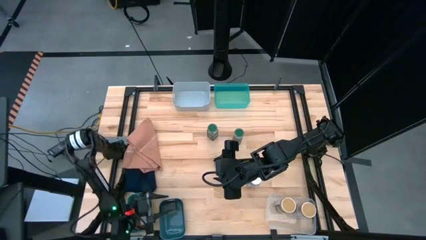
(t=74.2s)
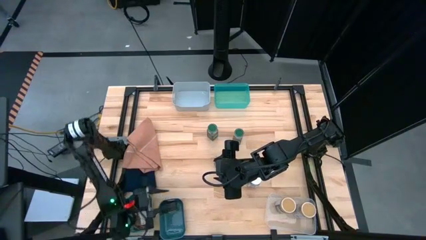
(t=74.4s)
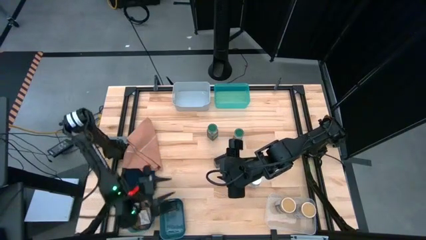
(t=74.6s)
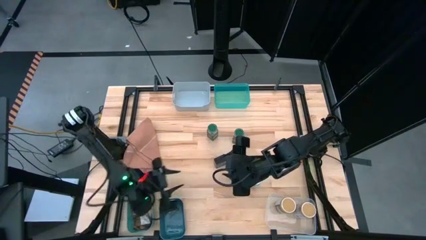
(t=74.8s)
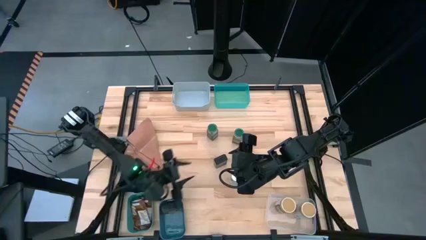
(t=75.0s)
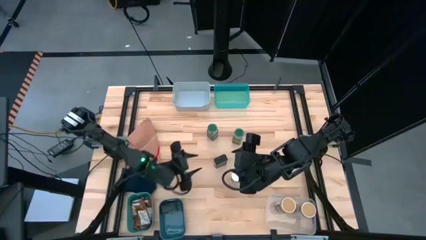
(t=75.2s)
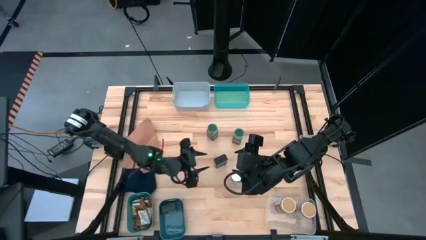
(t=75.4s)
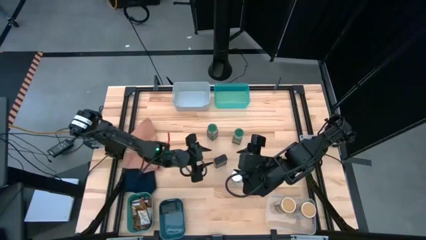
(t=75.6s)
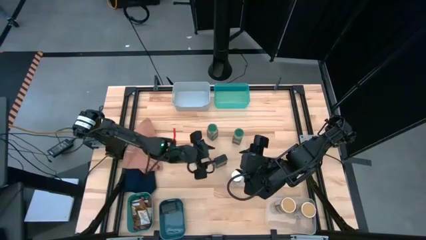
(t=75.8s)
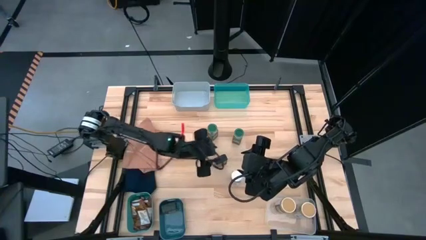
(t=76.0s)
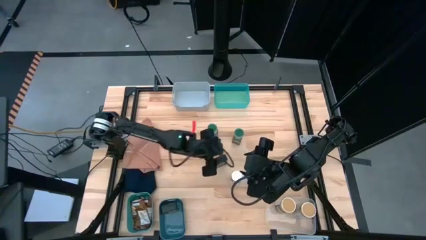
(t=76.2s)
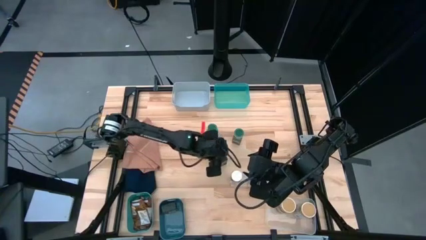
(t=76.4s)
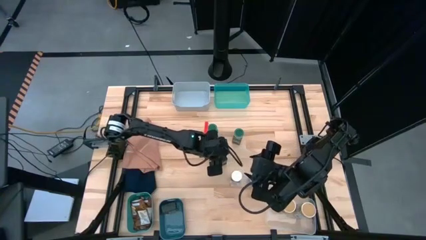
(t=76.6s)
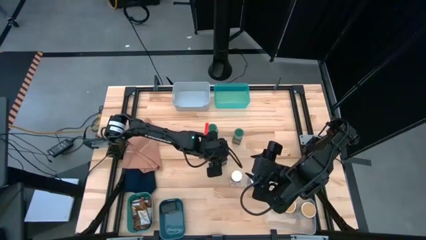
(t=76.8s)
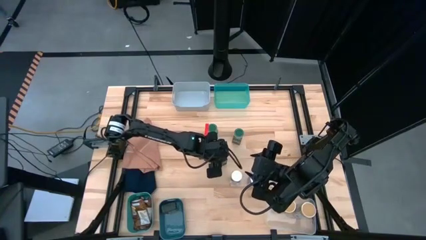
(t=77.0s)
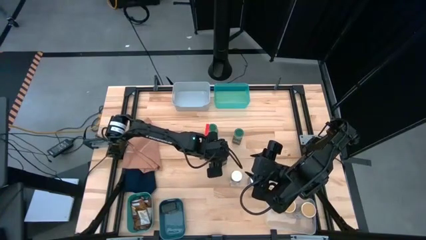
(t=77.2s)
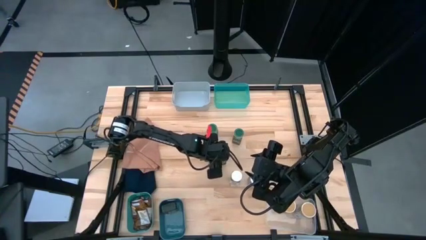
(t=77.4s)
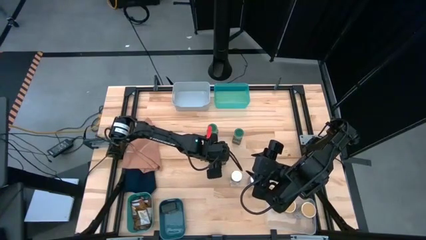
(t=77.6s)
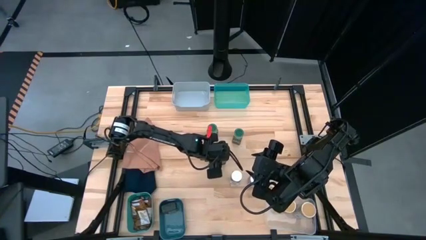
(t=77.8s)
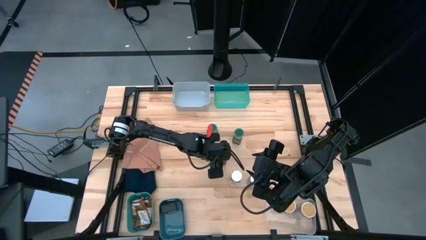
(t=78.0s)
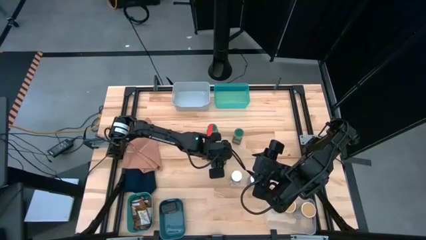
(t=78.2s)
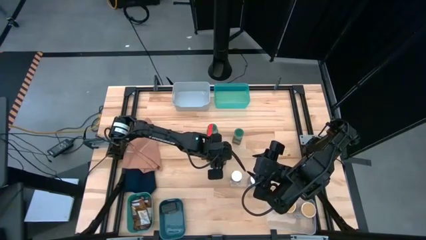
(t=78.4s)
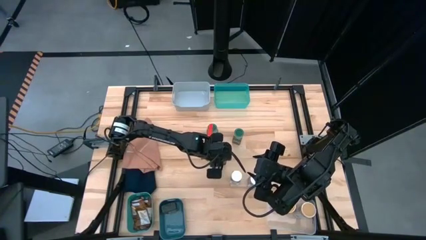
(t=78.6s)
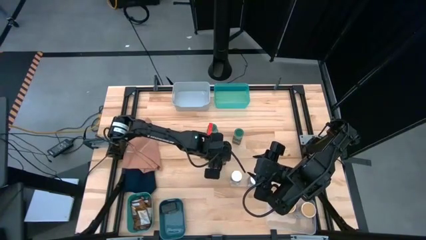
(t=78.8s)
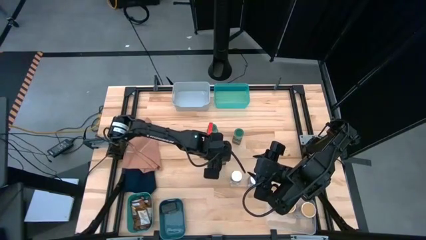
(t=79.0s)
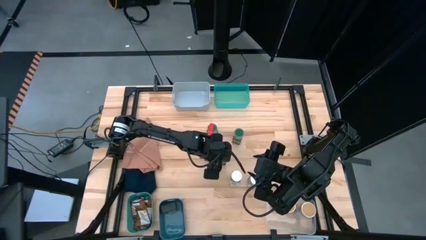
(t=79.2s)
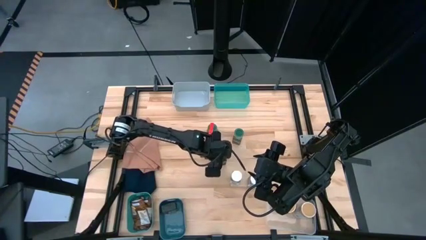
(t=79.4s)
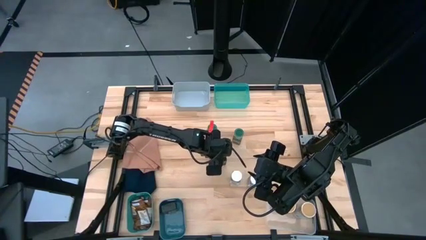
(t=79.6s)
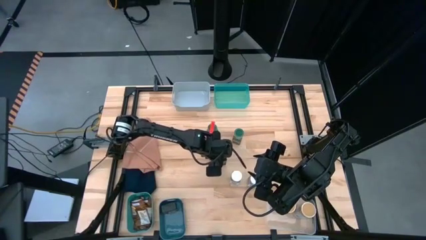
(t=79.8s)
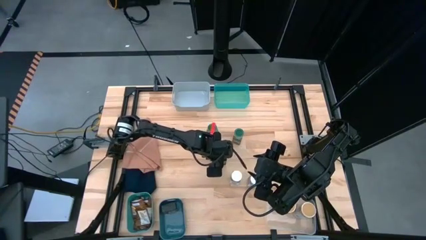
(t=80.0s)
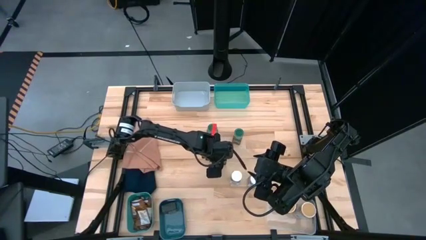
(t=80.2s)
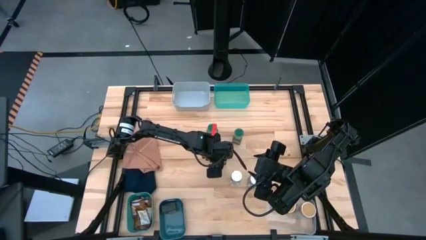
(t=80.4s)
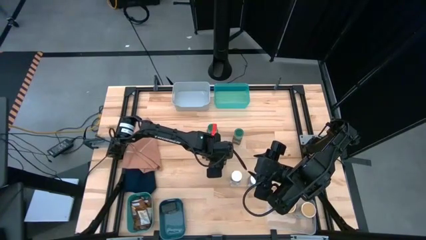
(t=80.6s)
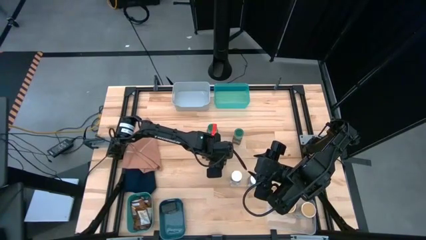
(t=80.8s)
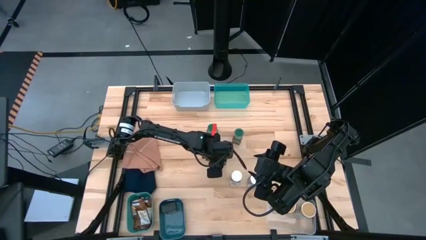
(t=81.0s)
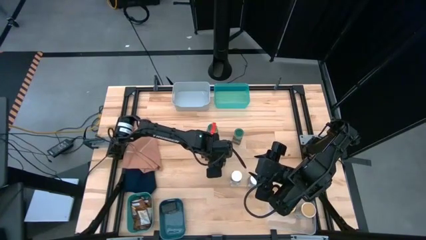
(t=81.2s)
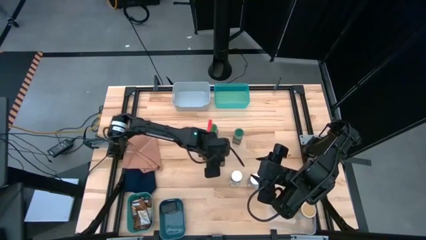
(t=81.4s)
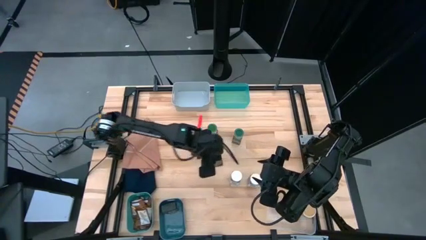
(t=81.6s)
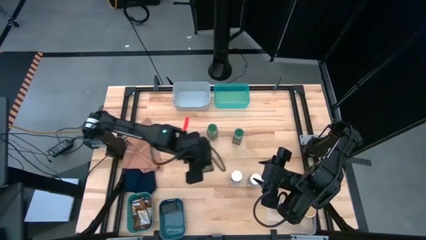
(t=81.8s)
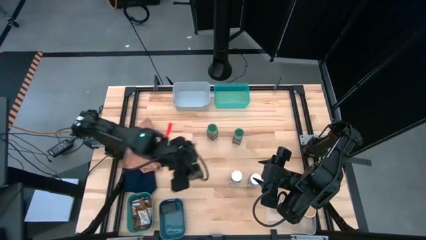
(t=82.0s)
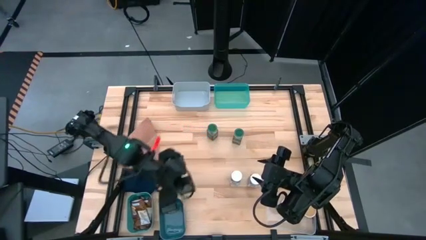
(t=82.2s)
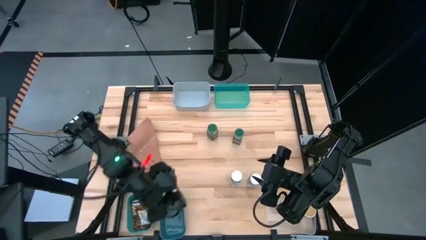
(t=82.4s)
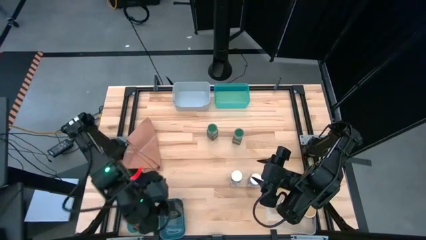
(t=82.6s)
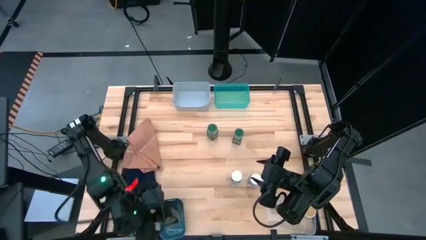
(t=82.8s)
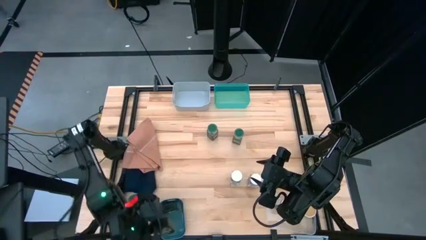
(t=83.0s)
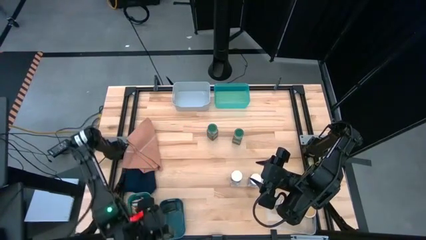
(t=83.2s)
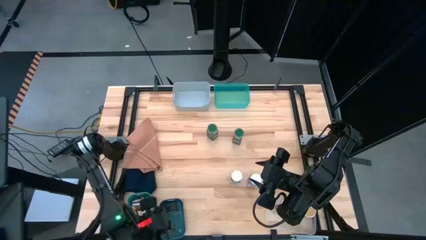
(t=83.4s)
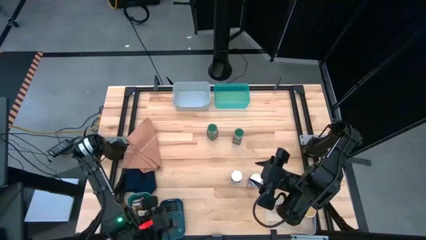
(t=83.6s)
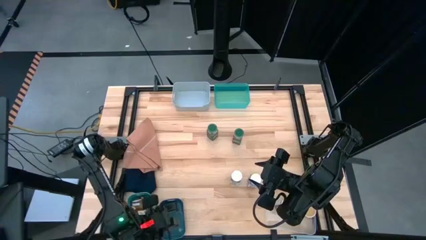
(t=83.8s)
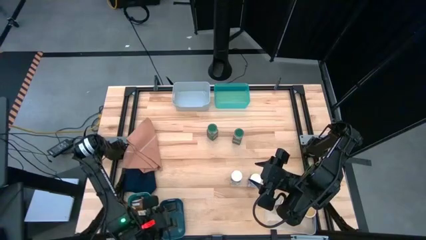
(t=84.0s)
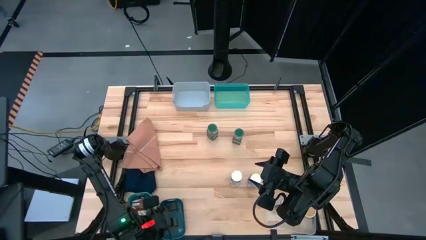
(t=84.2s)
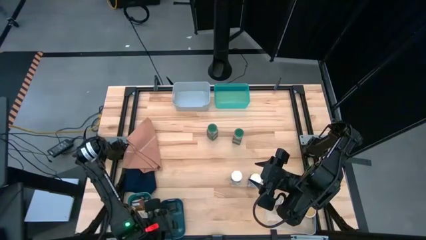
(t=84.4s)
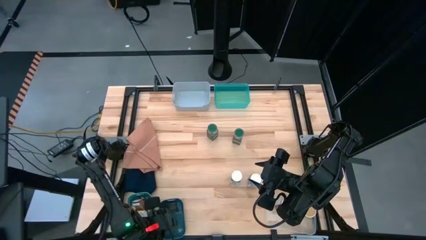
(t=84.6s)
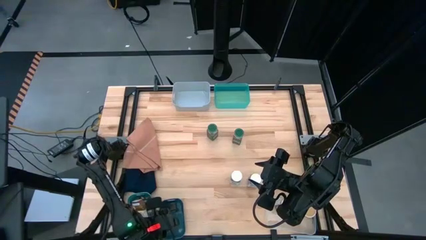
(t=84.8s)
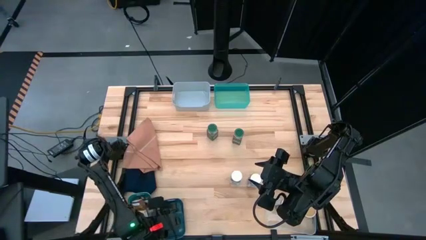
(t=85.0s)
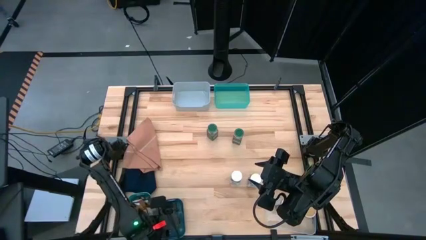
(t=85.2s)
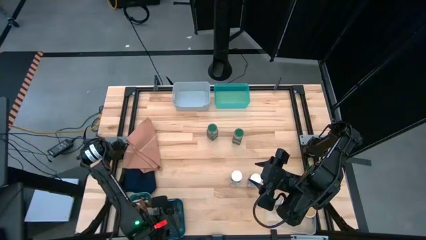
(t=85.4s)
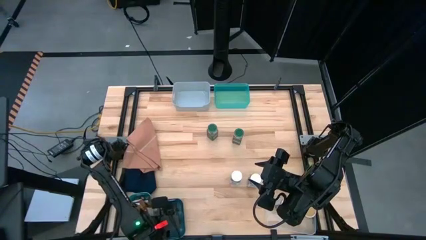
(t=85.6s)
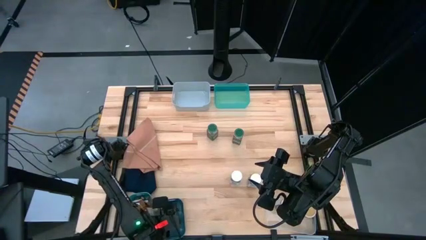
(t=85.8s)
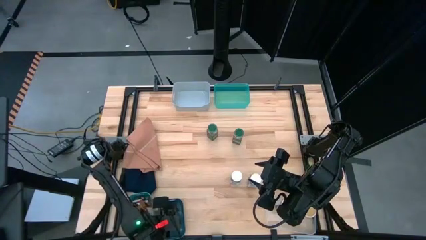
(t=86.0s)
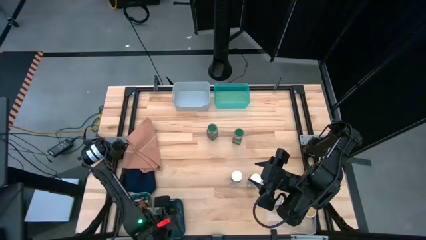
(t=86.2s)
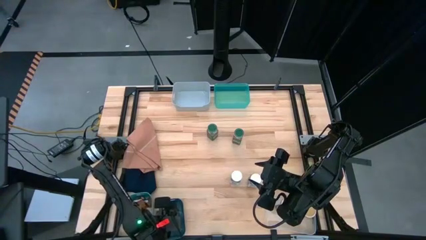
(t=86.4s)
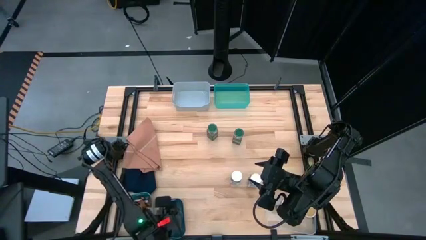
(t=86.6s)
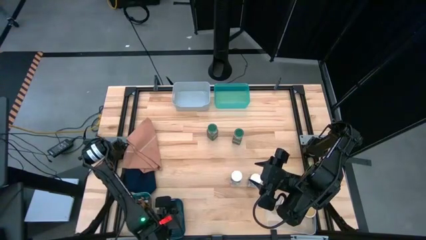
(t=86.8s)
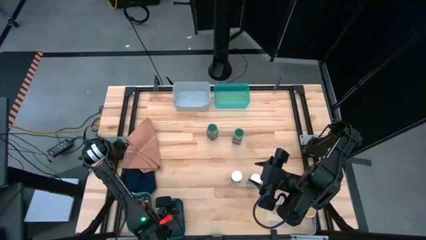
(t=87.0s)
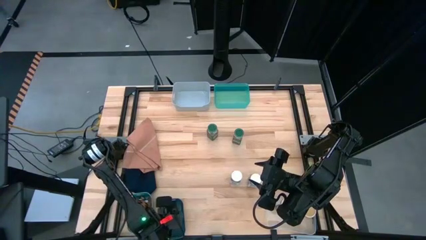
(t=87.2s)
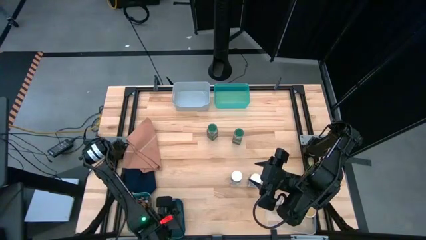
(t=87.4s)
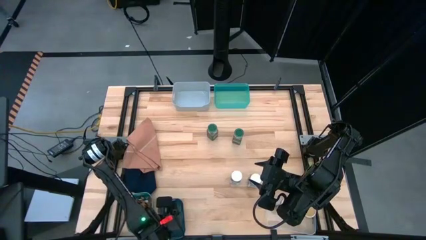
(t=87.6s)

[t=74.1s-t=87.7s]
Task: Sort spices by type
Put the black spice can into the blue bin

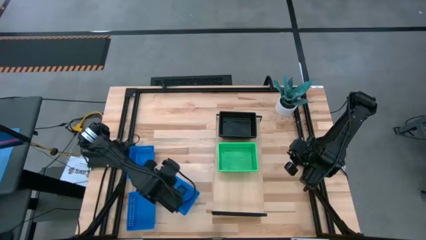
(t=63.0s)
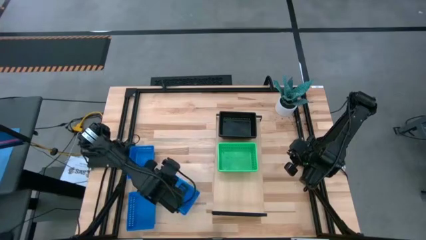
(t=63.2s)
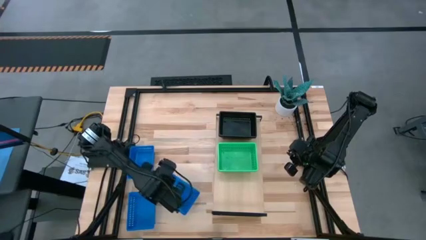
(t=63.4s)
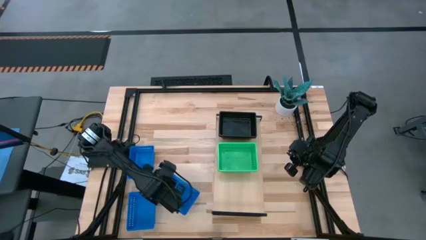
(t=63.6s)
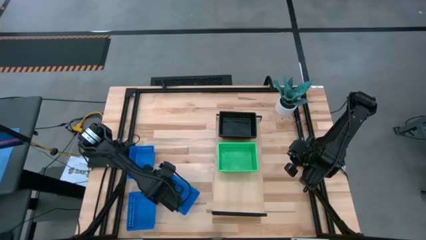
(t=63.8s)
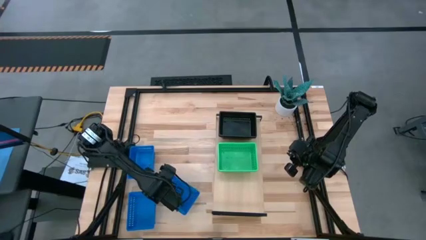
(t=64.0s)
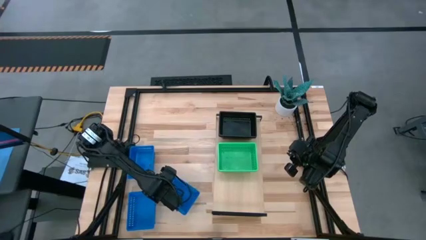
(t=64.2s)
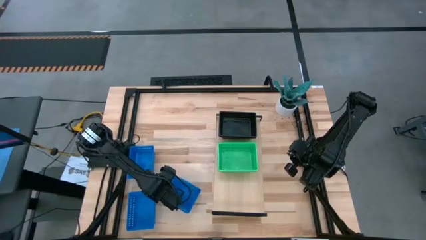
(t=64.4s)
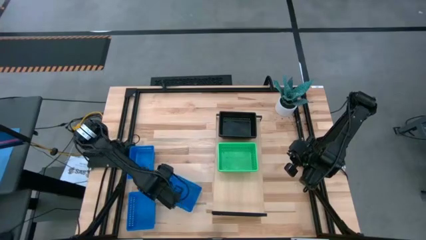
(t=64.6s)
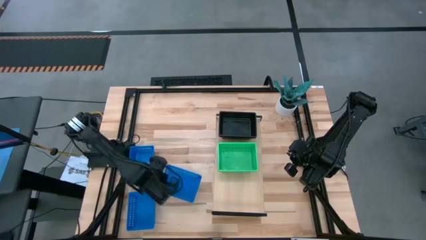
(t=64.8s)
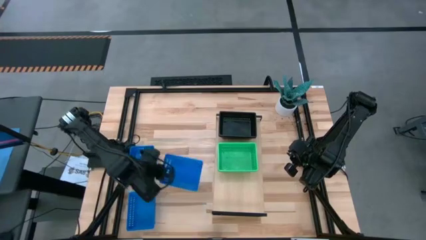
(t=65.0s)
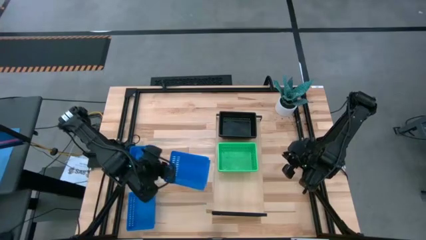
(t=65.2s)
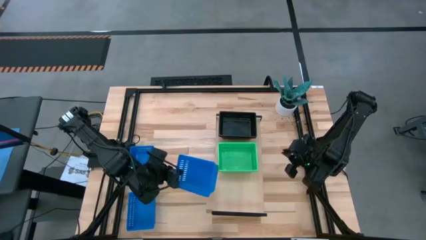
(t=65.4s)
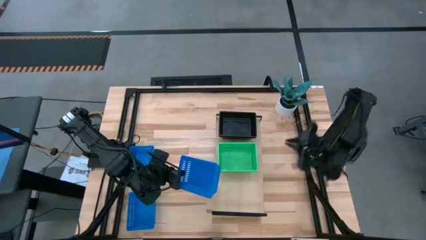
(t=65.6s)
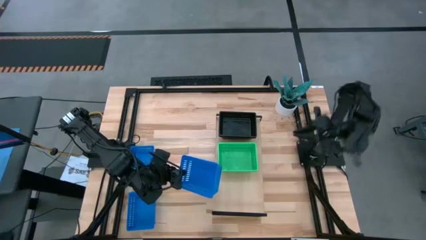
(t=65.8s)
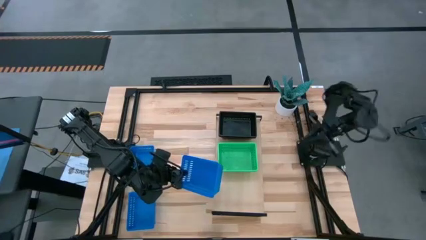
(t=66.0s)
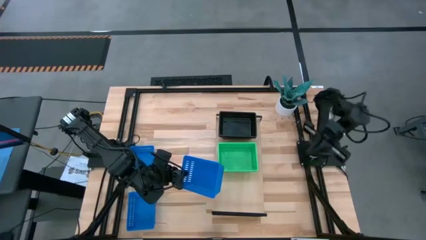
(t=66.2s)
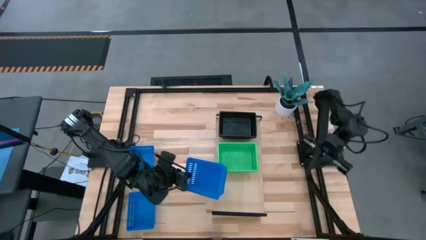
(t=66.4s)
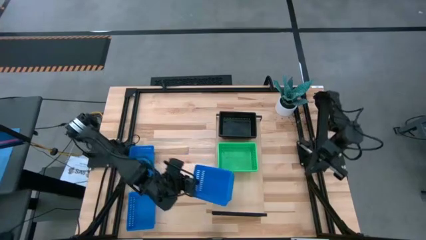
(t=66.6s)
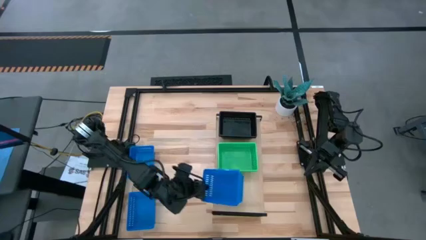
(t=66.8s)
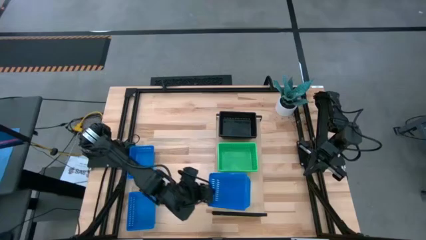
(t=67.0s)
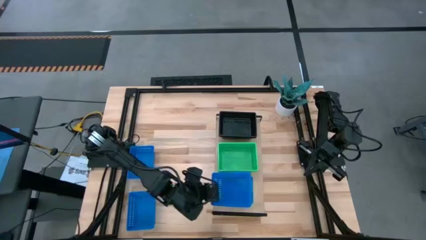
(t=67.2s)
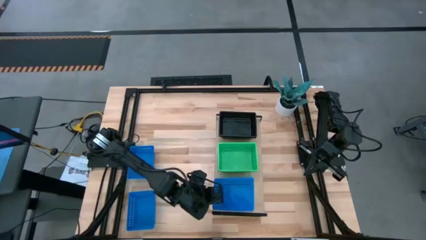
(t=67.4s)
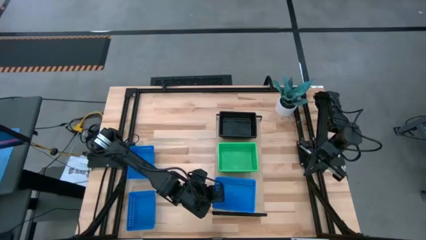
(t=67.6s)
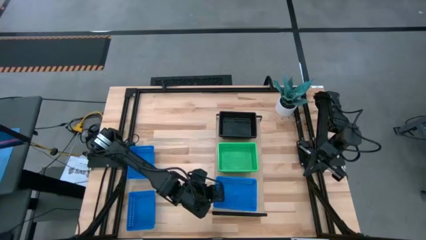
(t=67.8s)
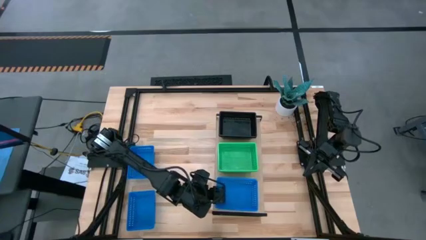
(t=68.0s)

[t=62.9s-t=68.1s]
Task: Stack baskets on shelf by color
Put the bottom right blue bin on the shelf
